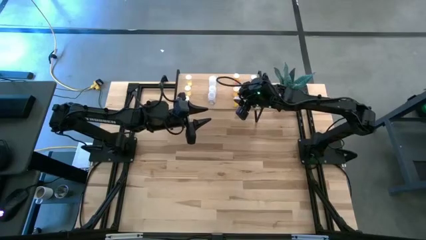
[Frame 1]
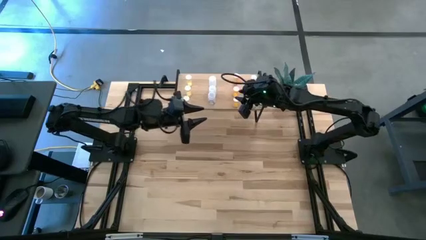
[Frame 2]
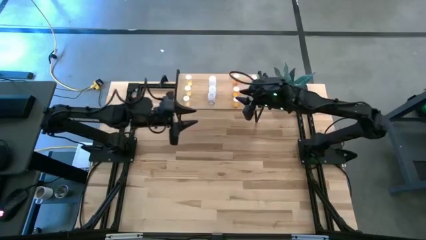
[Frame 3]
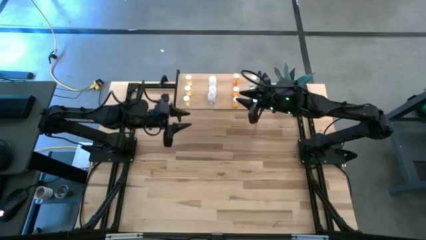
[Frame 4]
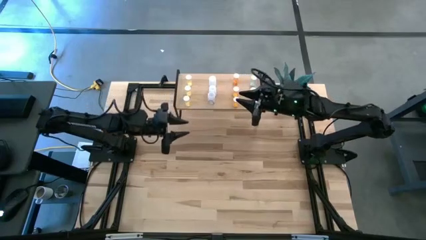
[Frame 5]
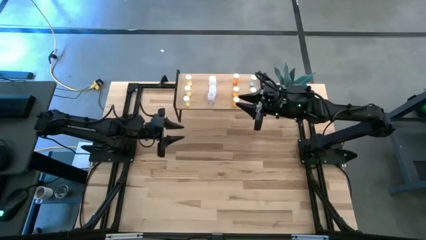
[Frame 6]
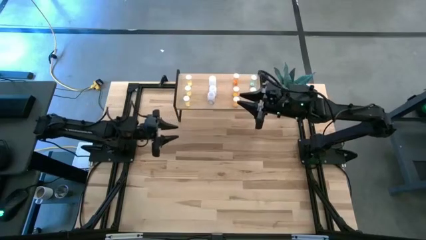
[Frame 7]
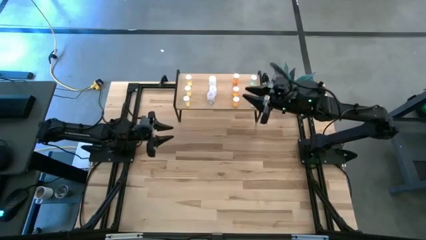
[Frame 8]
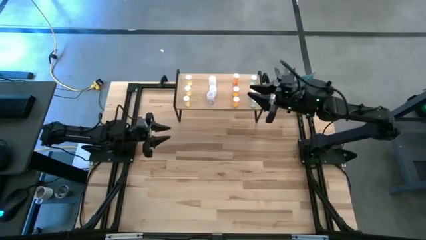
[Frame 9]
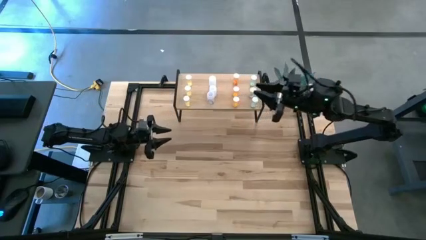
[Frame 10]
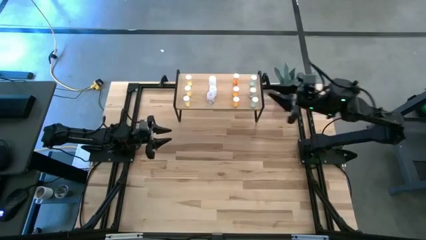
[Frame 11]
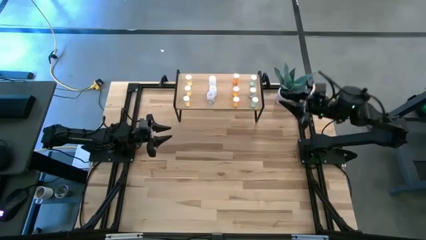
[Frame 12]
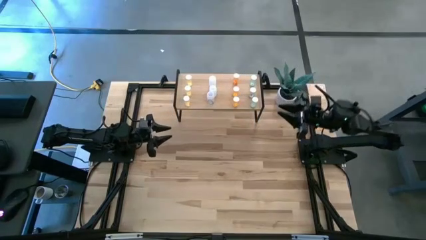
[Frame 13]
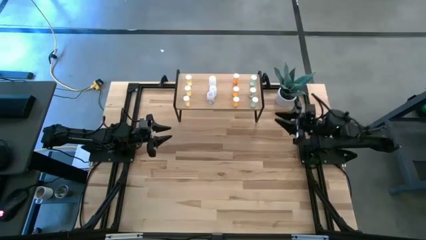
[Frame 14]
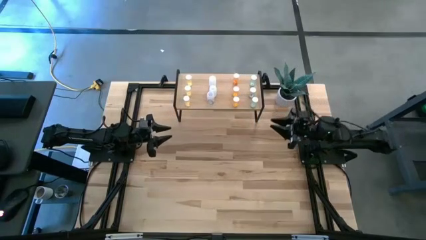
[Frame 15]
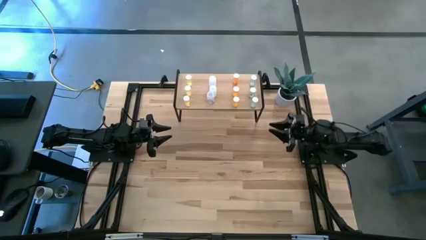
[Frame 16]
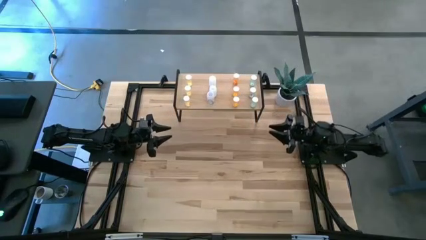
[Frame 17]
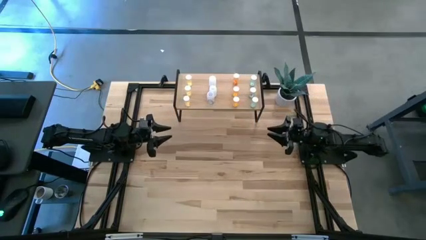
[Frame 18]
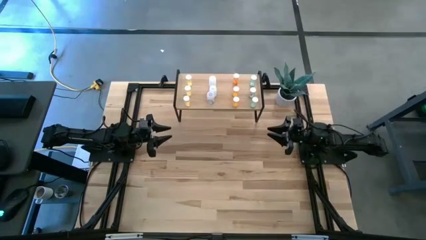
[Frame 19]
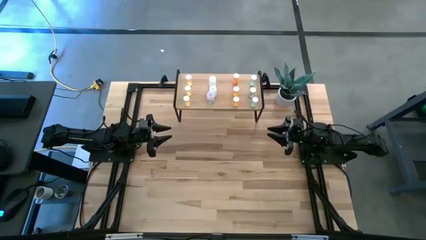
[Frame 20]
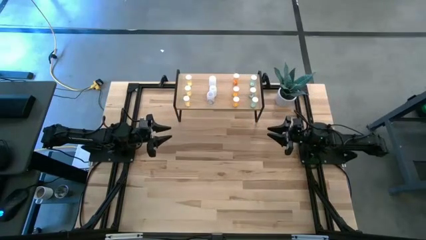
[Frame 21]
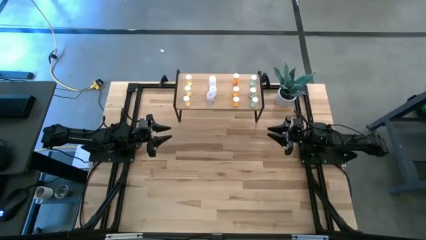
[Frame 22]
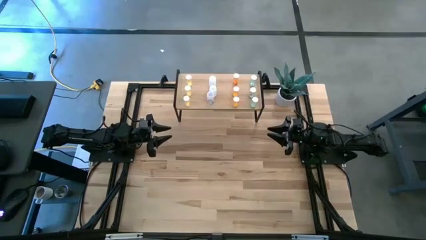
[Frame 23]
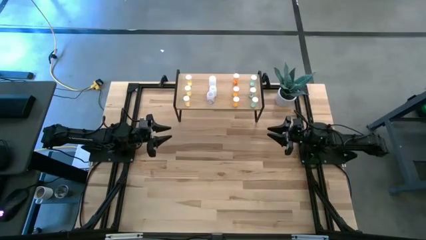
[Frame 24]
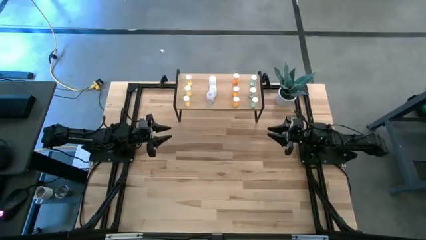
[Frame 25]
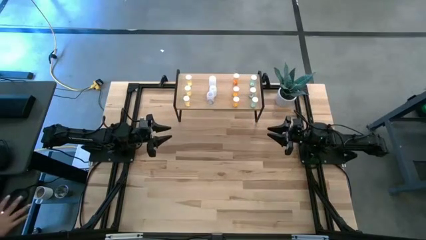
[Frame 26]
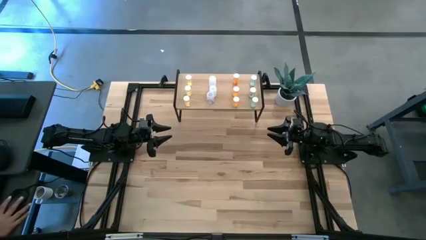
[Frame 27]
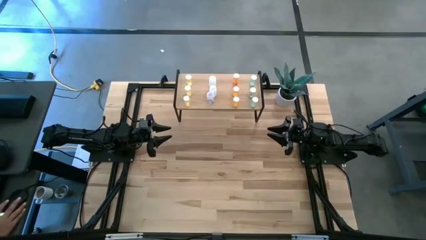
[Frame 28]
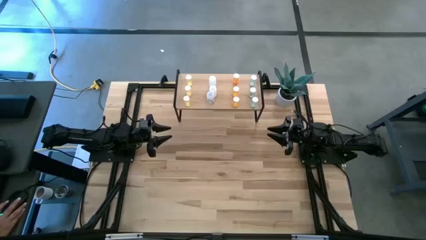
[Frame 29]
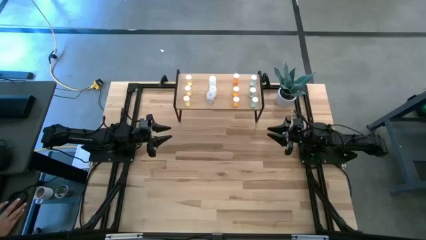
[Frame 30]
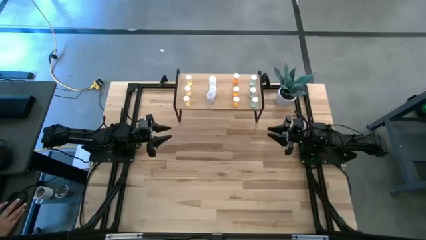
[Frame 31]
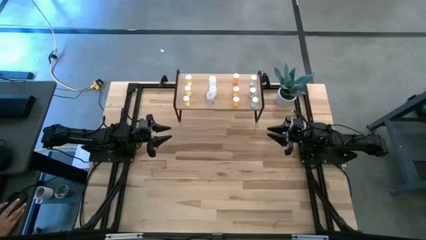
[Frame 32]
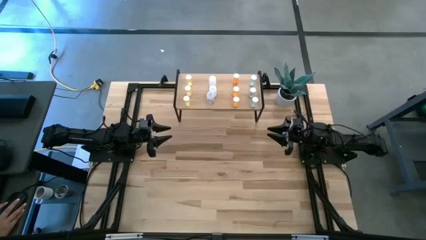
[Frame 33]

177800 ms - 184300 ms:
Task: Pick and place medicine bottles onto shelf by color
Return to Home Position

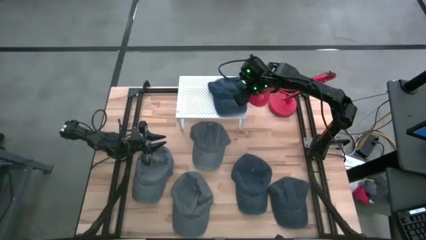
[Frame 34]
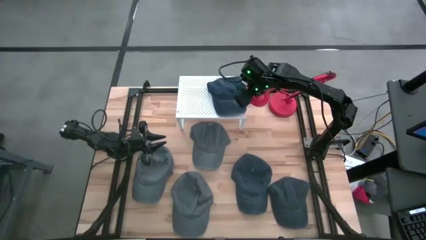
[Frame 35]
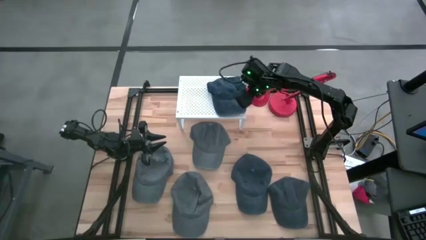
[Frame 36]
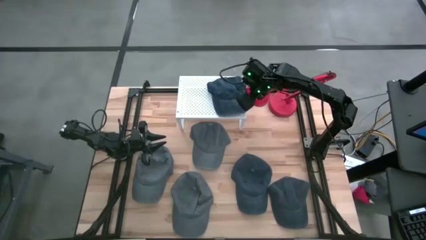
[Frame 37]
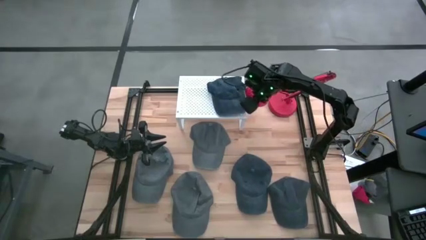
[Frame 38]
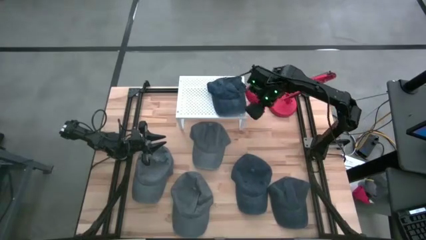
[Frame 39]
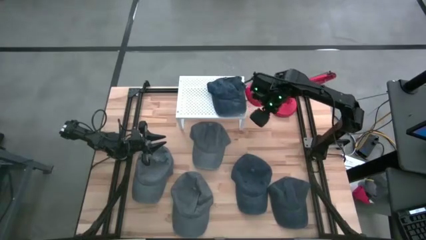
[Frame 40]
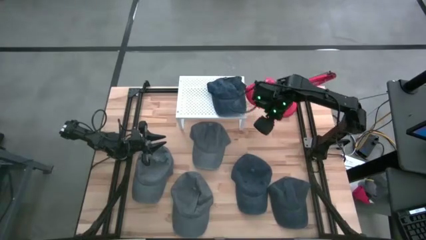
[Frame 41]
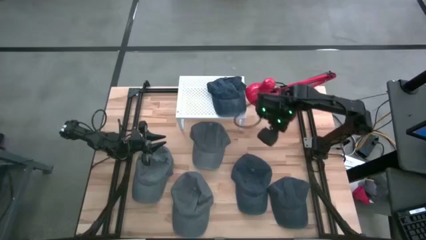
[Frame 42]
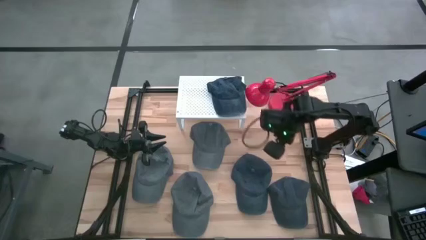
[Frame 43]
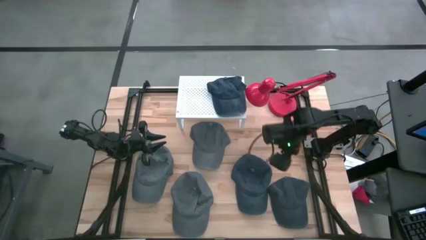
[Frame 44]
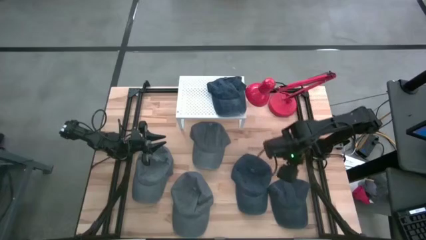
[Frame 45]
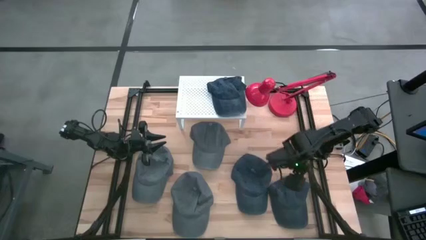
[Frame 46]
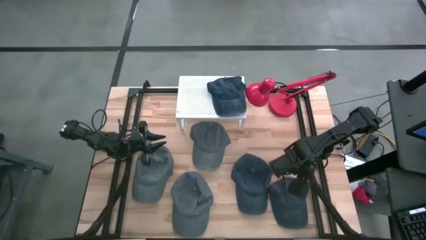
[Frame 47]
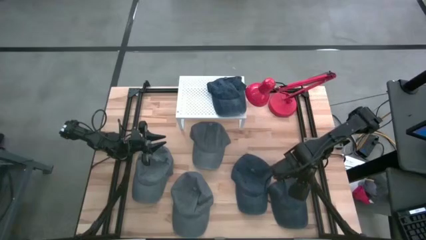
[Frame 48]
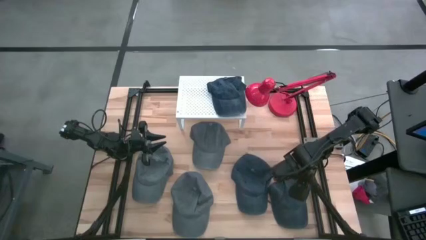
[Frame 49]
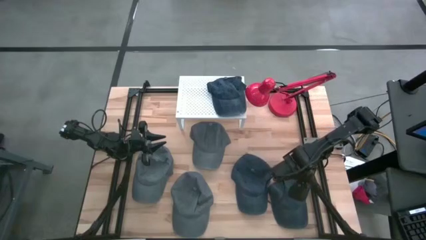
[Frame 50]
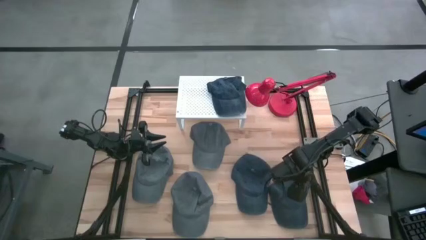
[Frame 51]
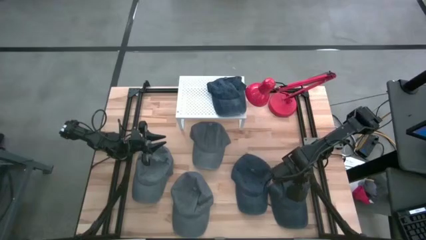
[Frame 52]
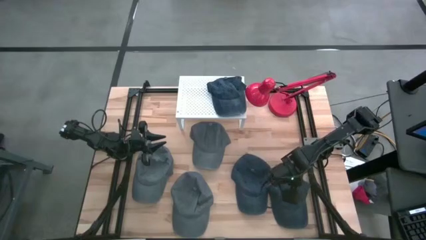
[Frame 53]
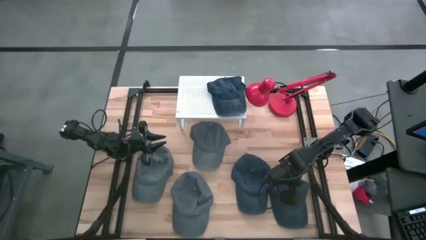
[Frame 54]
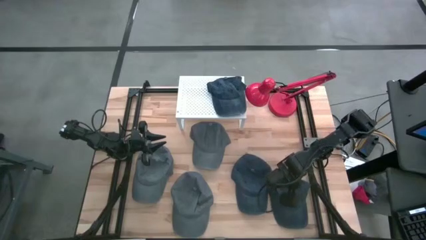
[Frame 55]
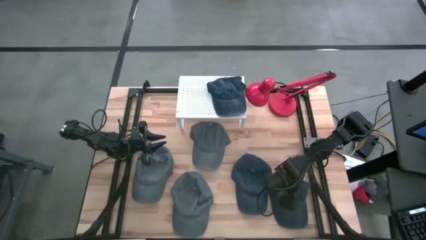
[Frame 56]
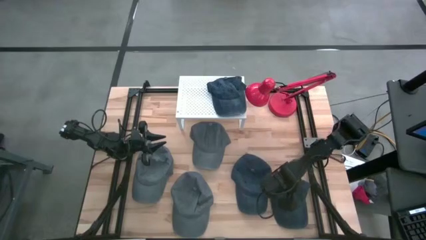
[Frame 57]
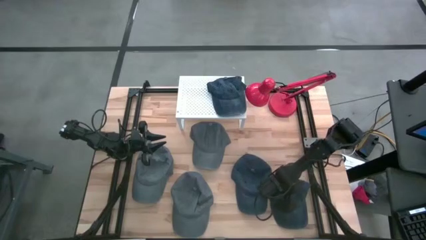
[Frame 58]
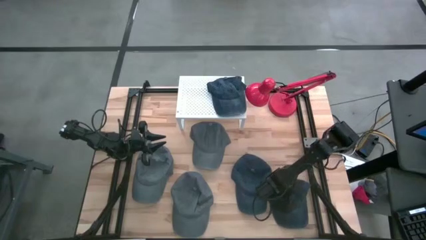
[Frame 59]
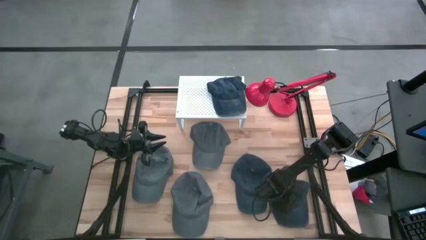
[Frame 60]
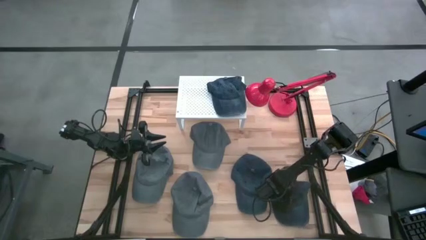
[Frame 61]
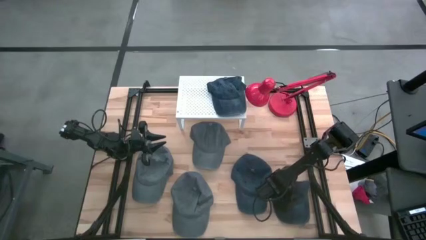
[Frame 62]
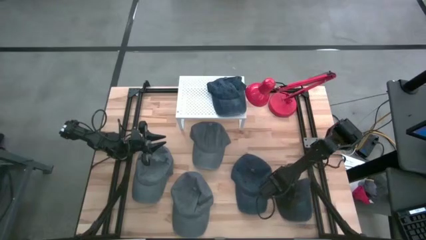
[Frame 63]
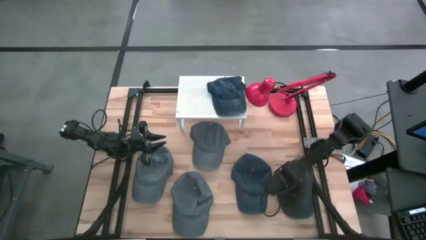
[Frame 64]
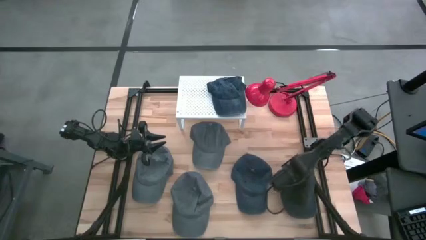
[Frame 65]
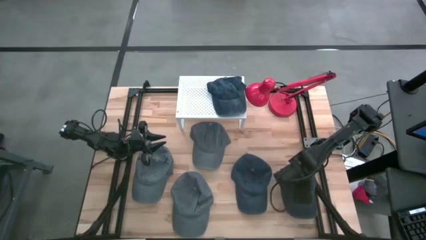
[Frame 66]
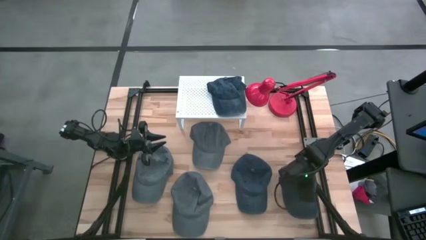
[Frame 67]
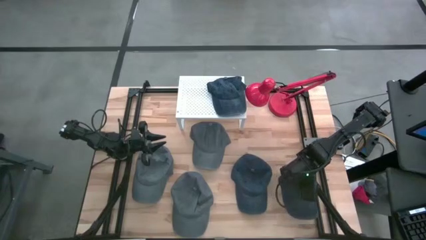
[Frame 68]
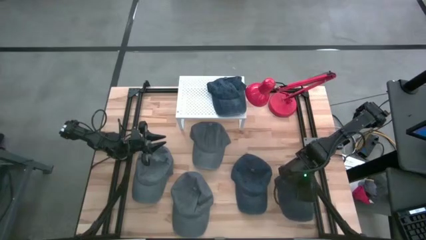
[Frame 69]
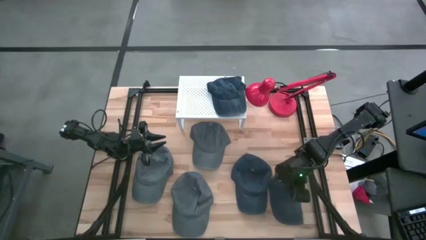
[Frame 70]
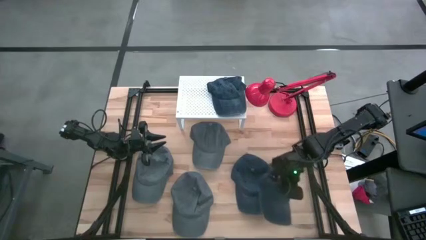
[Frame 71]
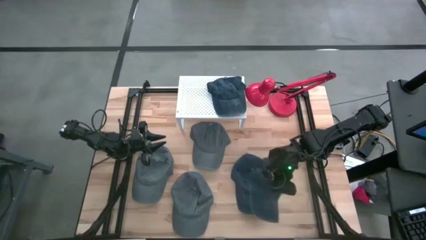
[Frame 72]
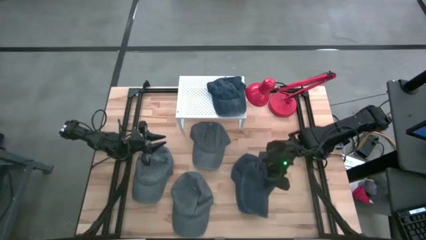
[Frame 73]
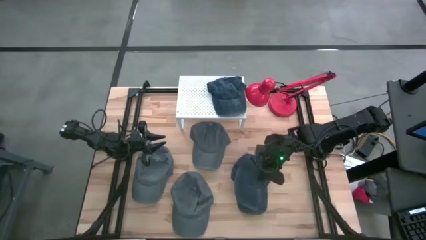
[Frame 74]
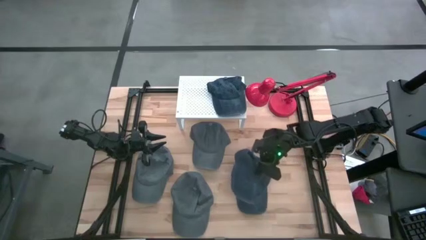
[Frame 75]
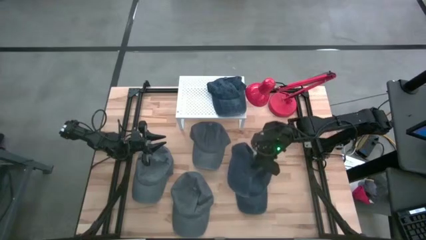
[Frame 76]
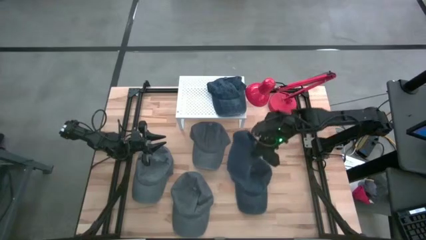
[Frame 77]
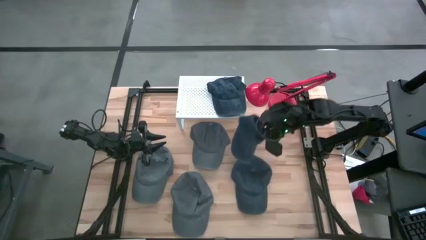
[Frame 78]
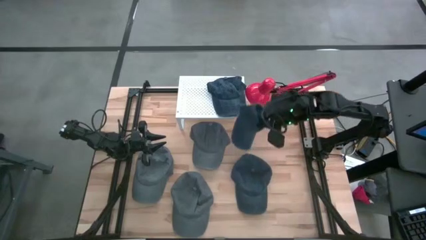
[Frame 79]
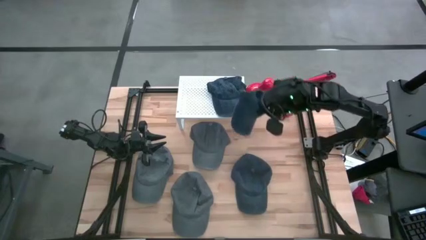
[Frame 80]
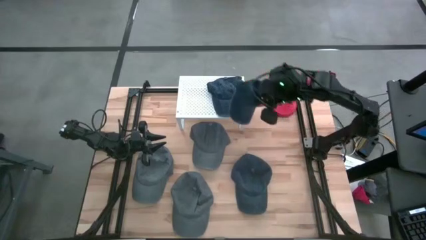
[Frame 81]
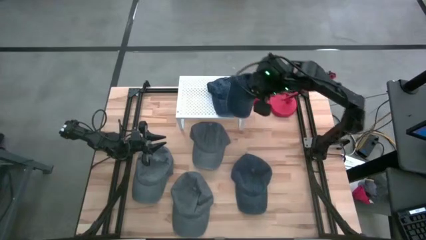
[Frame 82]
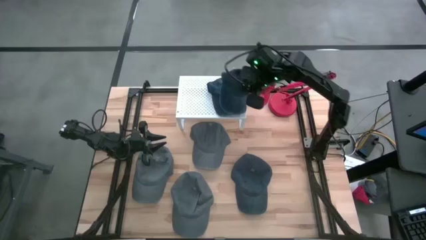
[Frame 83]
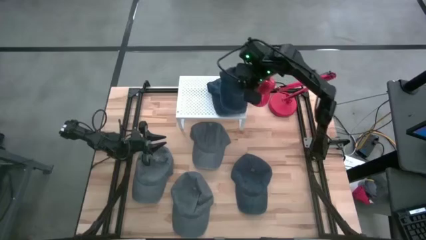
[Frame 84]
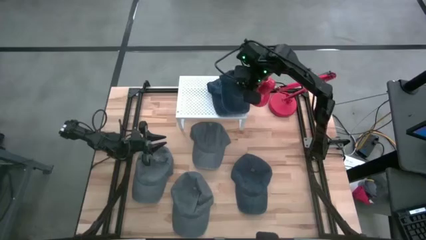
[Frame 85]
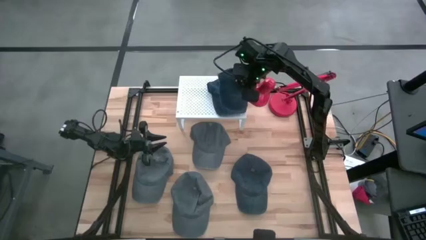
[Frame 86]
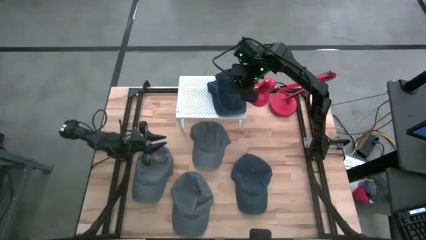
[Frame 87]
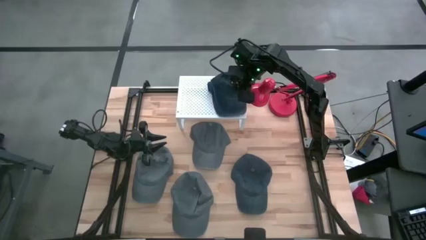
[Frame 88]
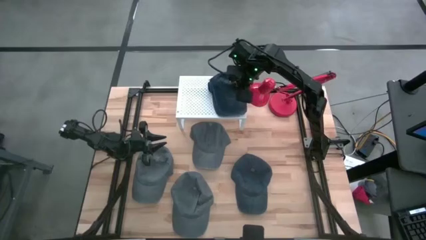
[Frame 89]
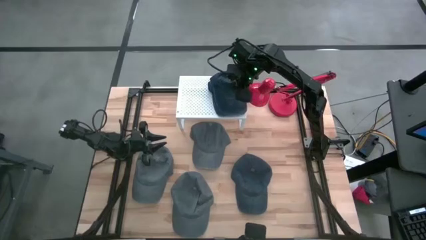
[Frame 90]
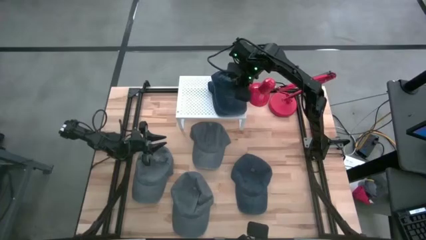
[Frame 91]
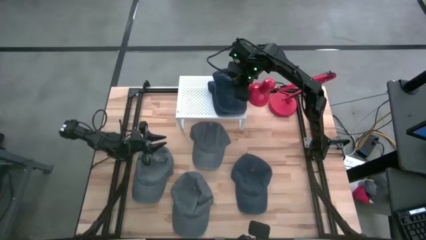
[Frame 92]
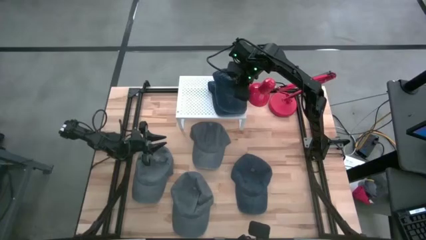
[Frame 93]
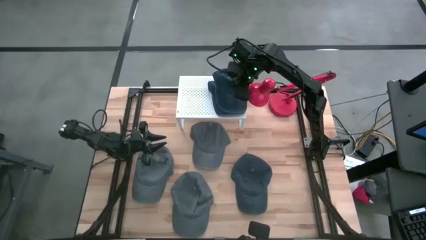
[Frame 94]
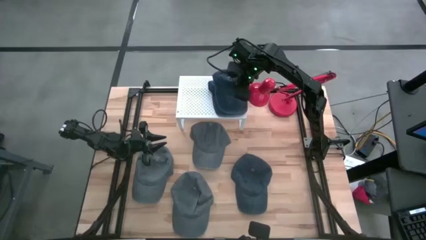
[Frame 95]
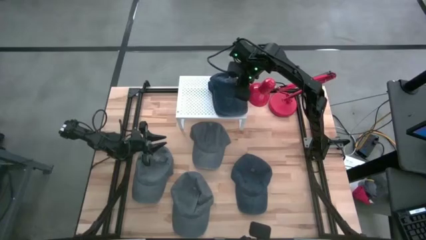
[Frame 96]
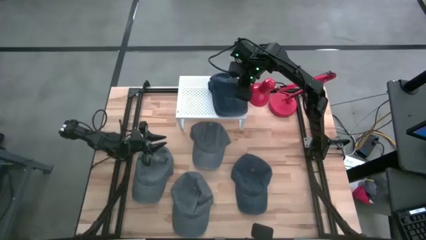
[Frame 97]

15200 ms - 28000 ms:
Task: Pick & Place hat
Stack the right dark blue cap on the dark blue cap on the shelf
